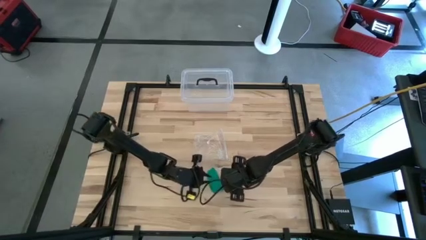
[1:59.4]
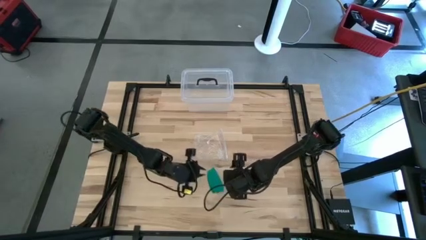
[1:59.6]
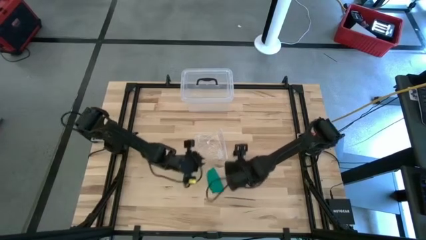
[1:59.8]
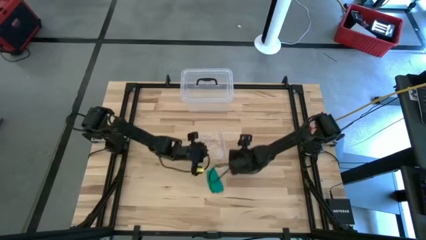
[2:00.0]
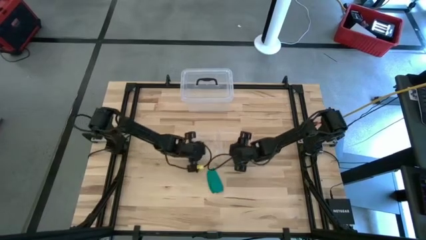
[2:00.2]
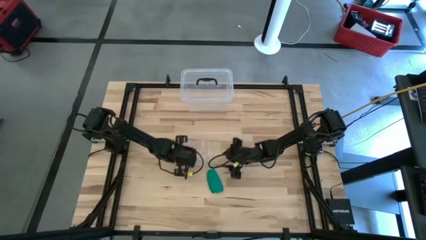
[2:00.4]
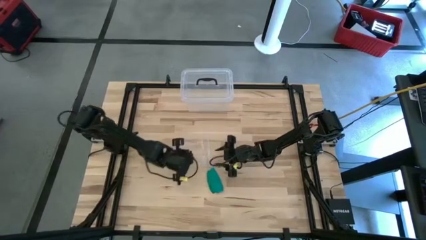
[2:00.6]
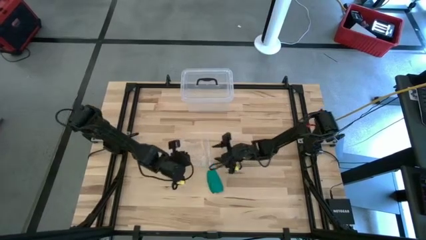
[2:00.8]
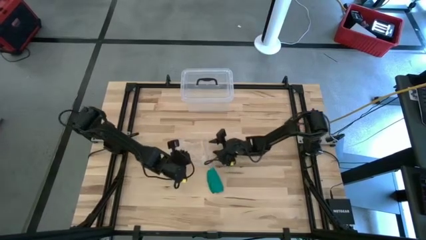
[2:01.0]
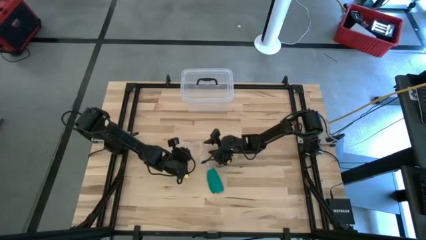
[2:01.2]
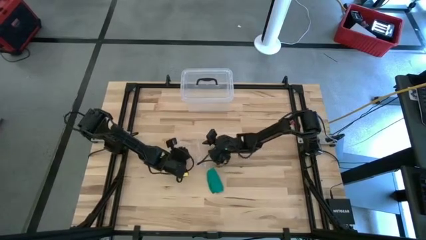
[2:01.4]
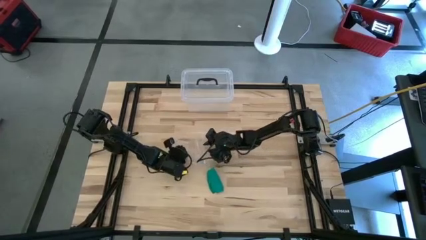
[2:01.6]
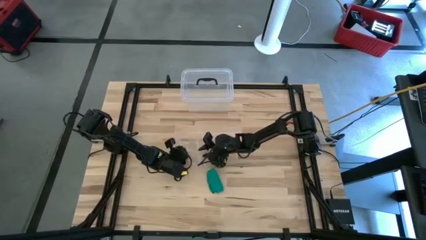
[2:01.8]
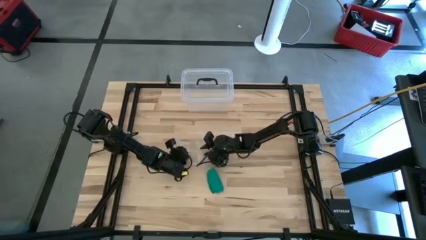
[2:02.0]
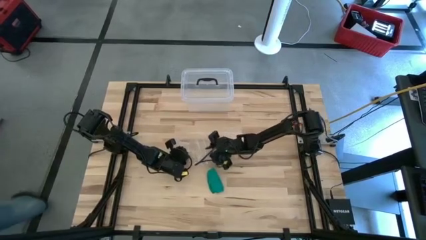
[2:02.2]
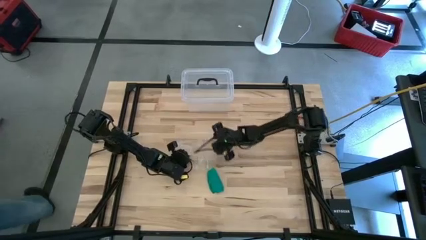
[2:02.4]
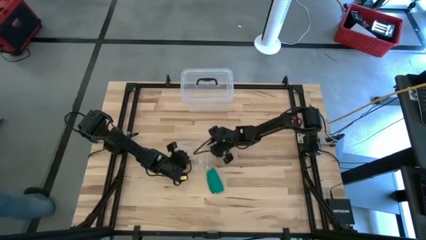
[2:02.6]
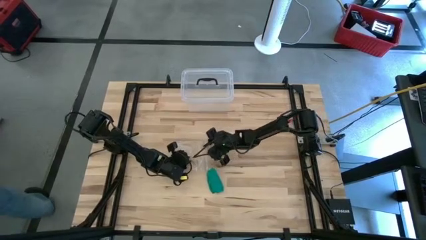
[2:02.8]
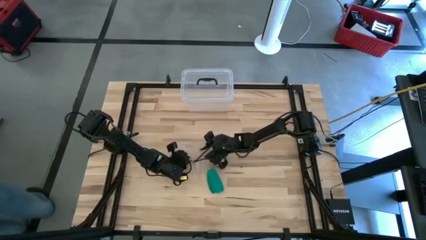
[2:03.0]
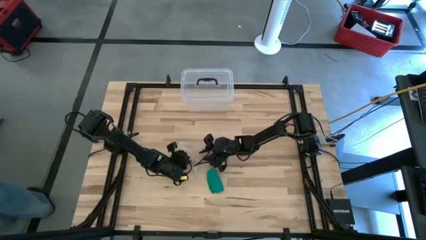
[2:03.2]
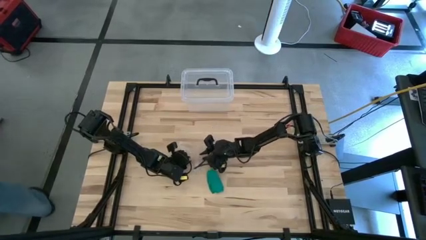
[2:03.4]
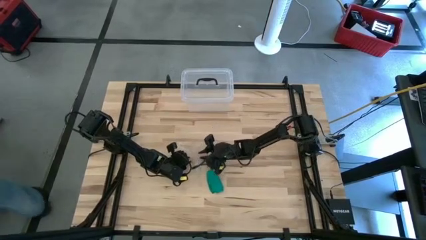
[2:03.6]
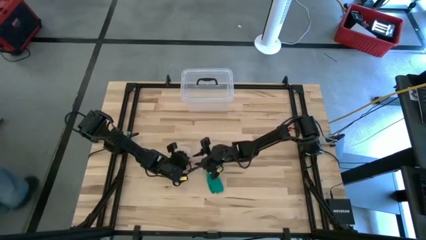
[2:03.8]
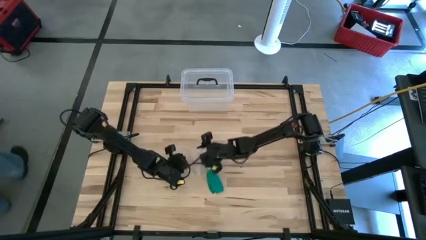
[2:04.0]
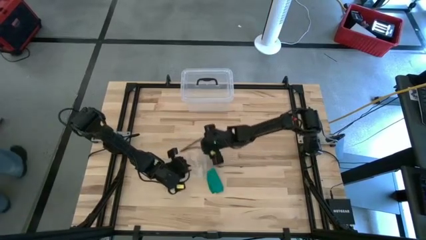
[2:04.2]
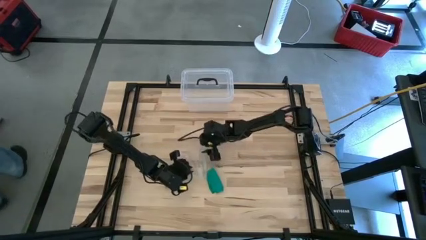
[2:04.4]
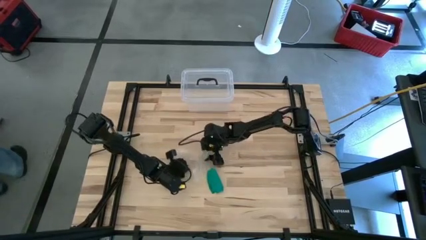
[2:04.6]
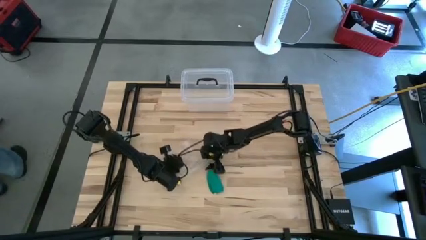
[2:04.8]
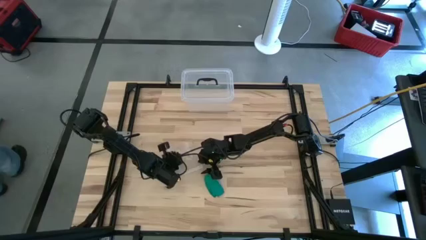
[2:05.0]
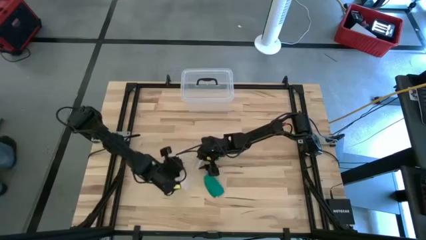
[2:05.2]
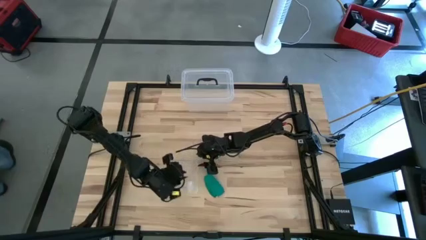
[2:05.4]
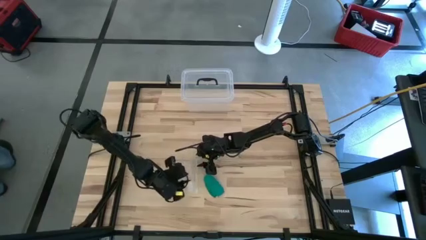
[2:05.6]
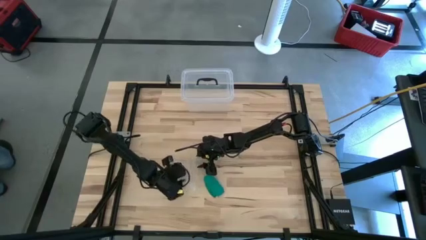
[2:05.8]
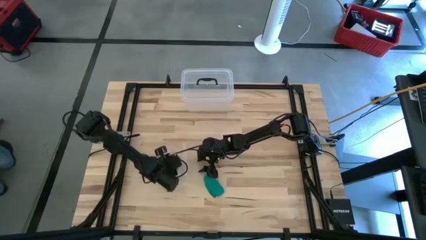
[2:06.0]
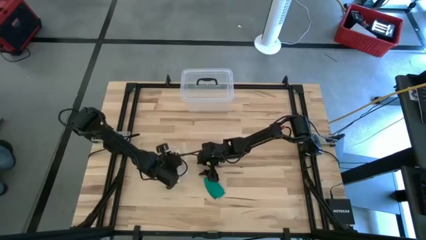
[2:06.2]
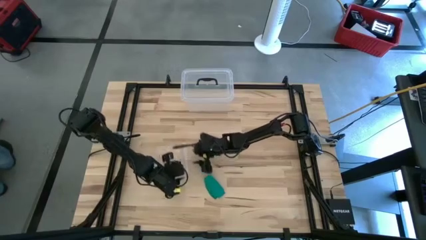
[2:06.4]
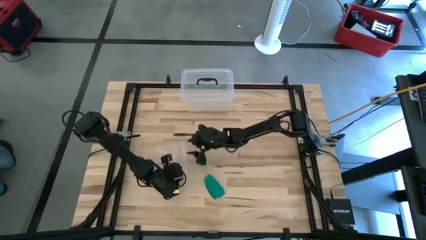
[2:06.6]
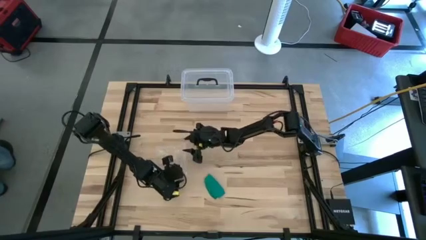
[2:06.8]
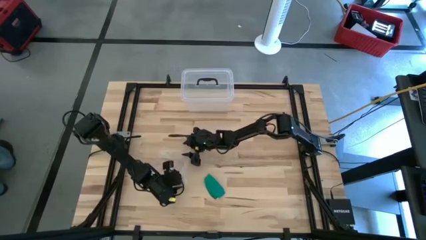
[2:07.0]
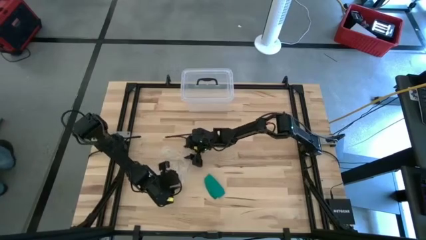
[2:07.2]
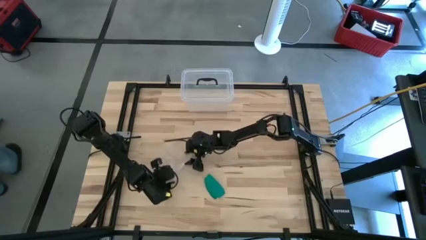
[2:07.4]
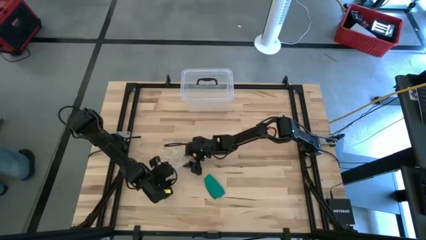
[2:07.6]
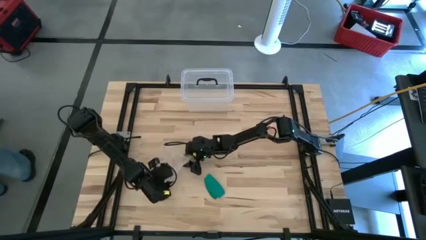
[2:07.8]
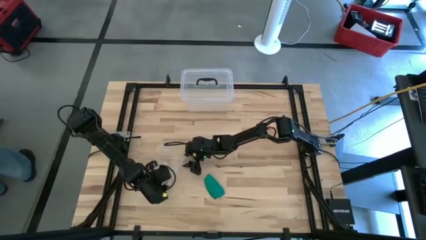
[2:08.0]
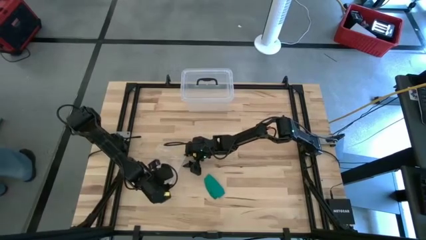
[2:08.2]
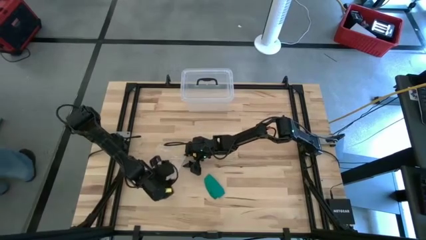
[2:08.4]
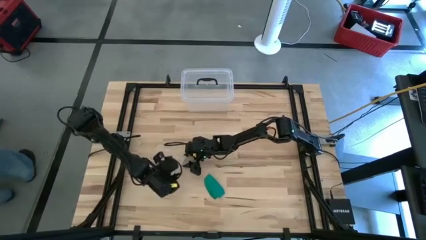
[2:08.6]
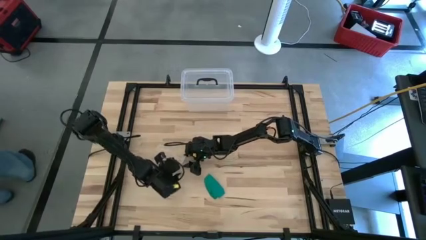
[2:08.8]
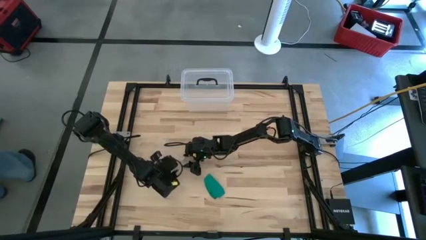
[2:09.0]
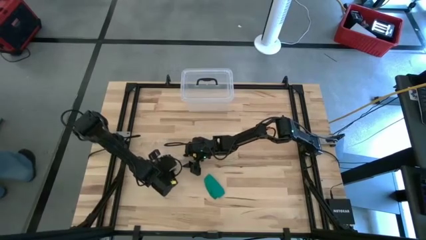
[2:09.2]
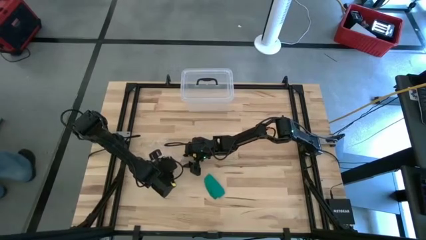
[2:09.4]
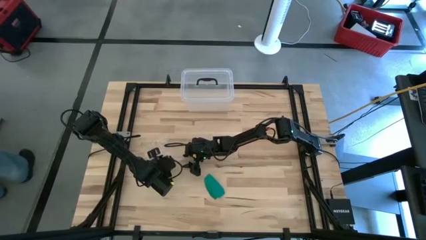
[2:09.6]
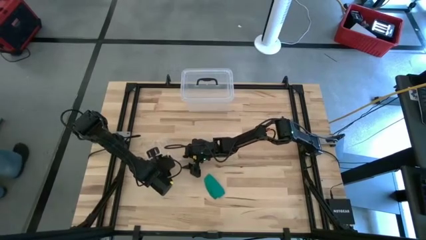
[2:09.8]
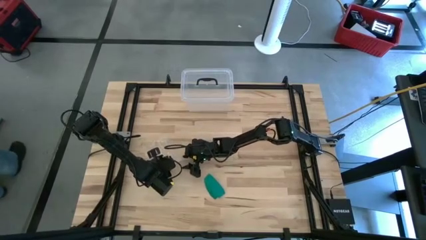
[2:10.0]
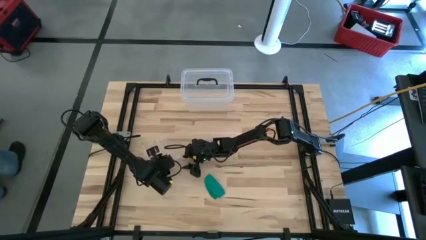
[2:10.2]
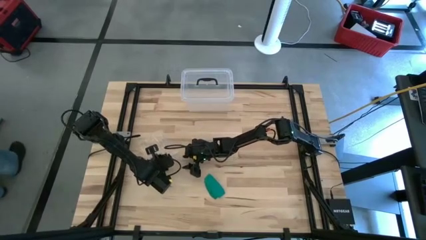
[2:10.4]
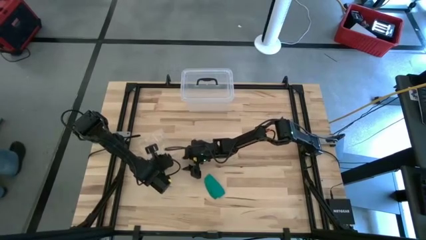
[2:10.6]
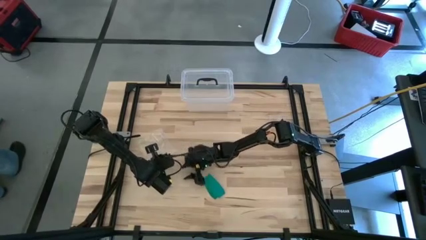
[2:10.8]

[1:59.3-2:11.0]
Task: Roll bandage
Prepare the transparent zip bag

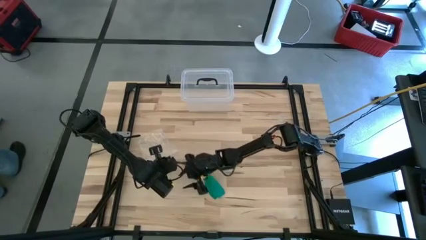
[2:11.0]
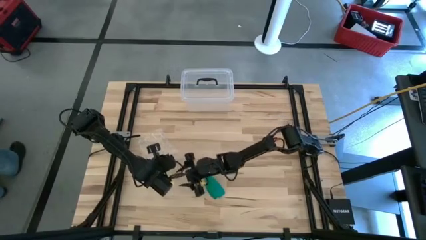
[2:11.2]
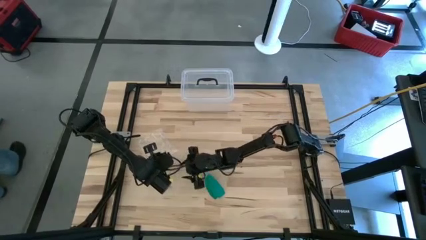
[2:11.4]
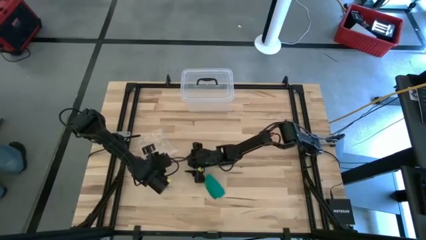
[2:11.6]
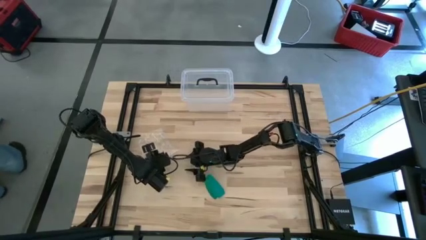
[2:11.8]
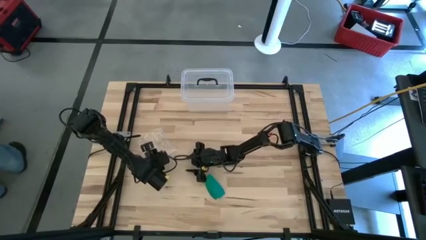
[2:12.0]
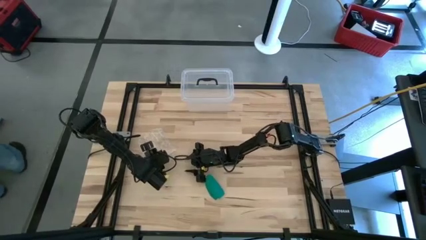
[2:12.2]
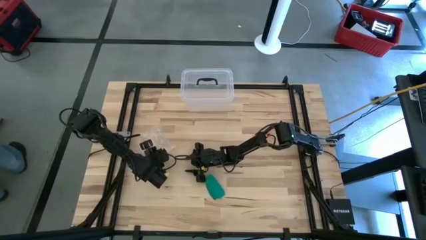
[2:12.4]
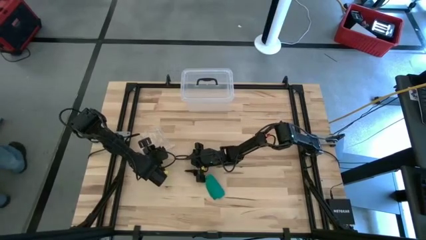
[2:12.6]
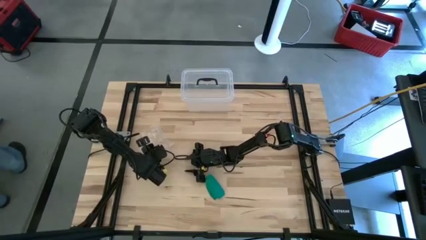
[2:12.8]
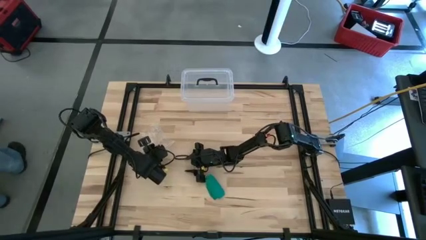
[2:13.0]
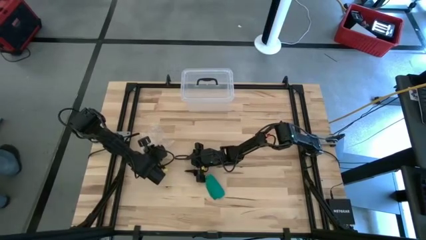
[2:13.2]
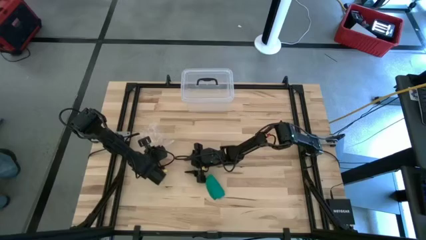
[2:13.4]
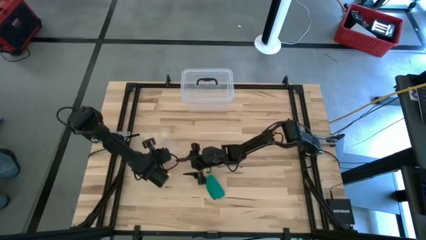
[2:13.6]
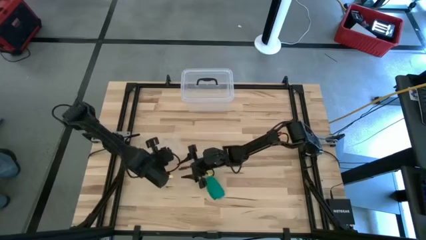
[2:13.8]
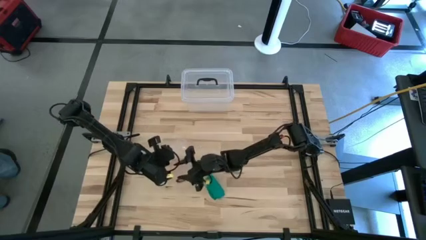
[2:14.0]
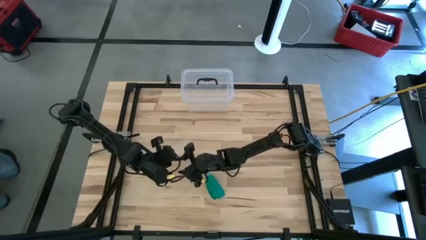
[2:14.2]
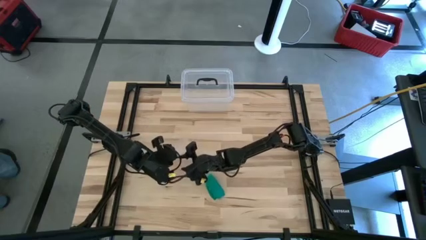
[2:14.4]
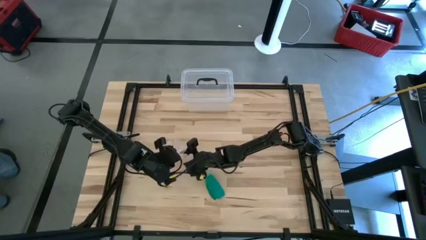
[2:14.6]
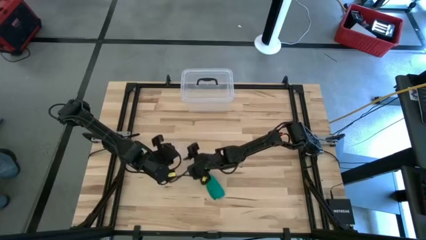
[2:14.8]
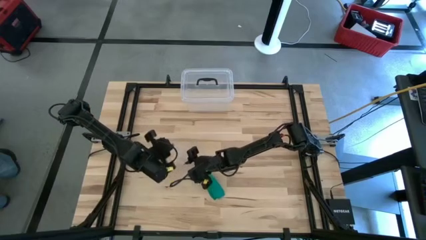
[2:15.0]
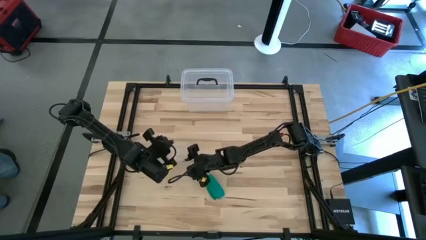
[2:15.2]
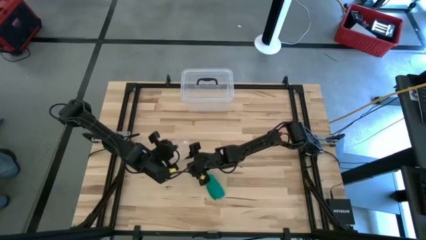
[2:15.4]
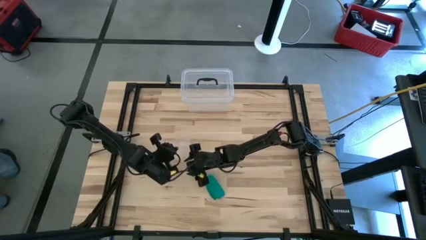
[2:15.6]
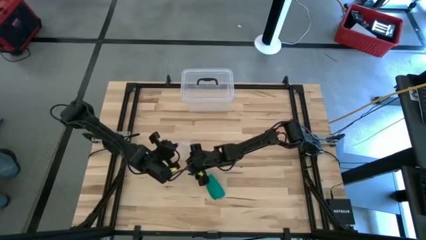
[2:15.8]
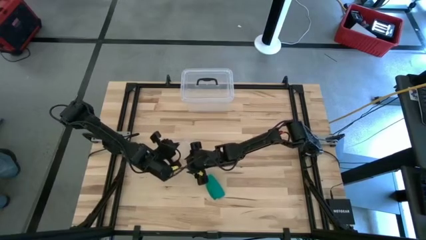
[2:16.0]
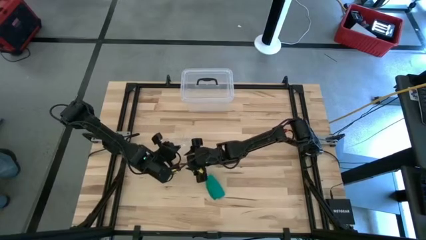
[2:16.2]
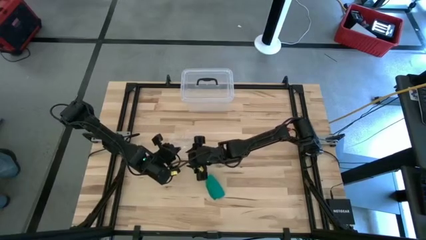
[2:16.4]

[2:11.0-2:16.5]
Prepare the transparent zip bag
